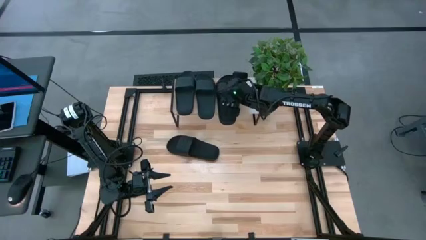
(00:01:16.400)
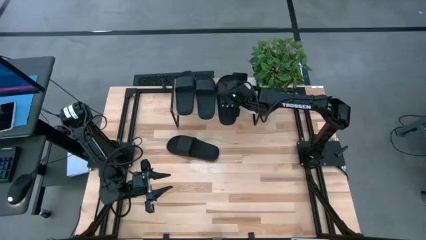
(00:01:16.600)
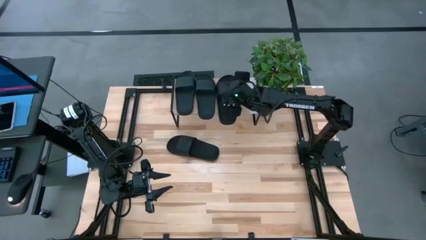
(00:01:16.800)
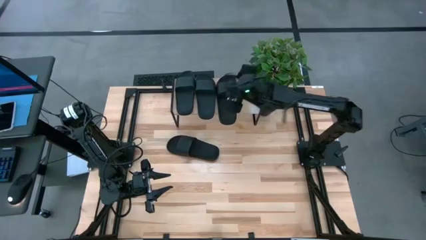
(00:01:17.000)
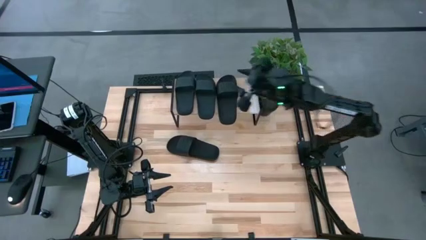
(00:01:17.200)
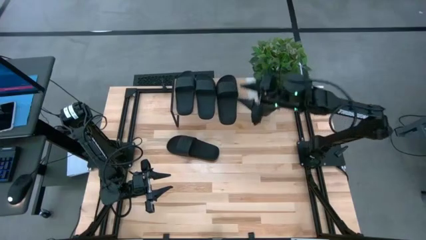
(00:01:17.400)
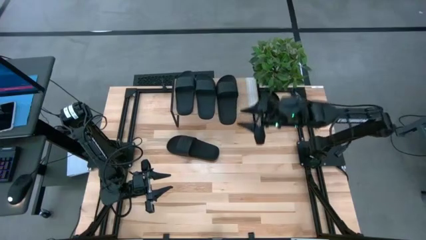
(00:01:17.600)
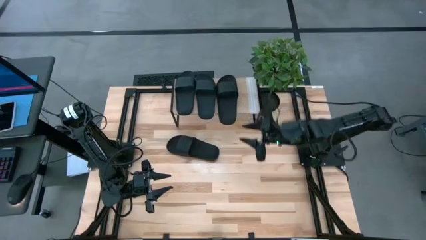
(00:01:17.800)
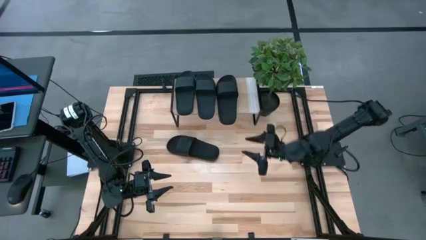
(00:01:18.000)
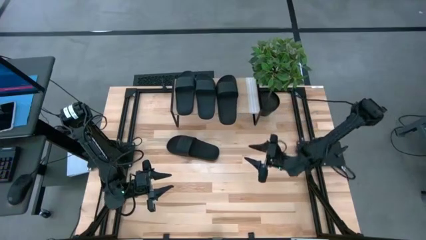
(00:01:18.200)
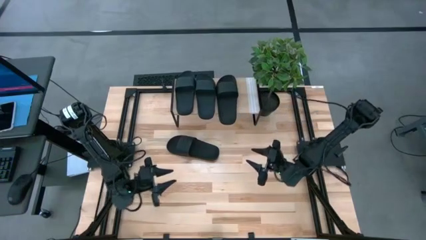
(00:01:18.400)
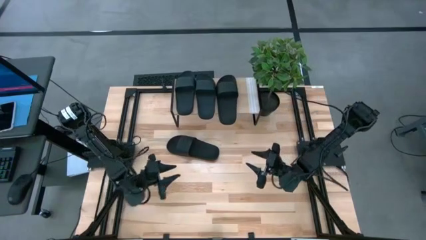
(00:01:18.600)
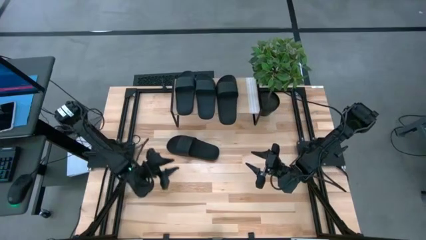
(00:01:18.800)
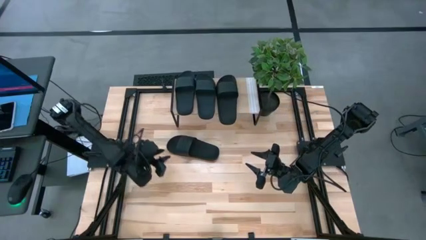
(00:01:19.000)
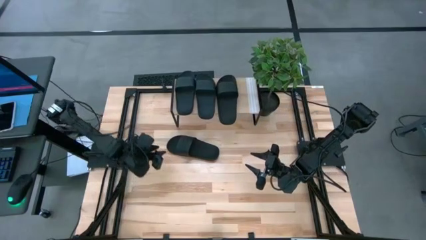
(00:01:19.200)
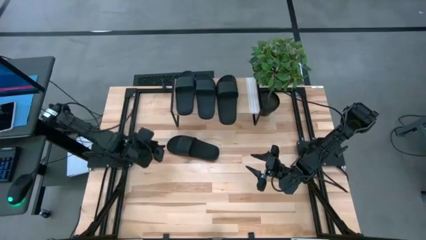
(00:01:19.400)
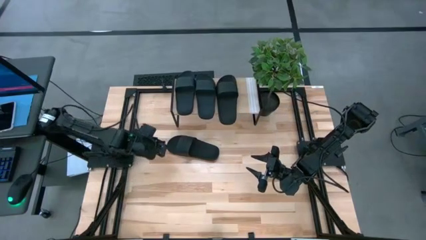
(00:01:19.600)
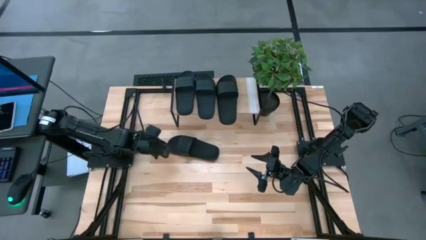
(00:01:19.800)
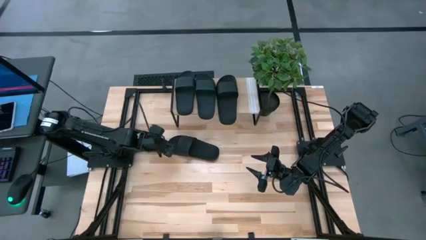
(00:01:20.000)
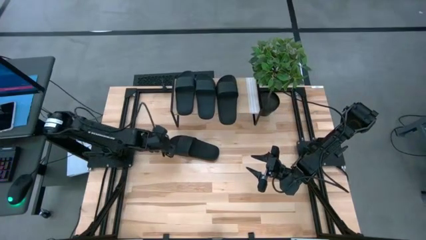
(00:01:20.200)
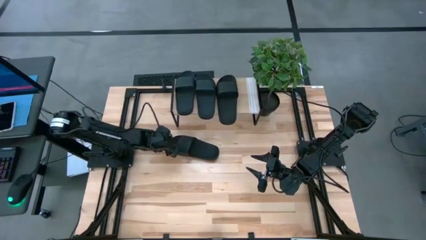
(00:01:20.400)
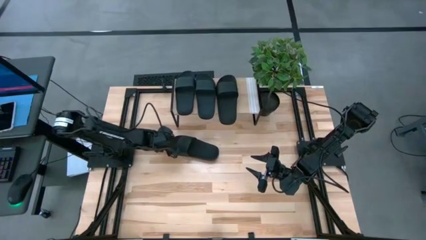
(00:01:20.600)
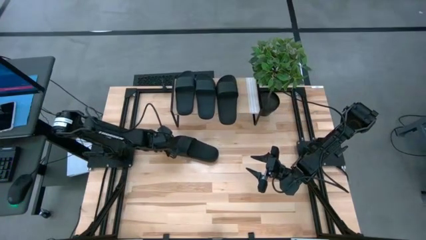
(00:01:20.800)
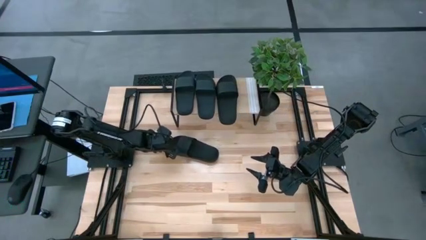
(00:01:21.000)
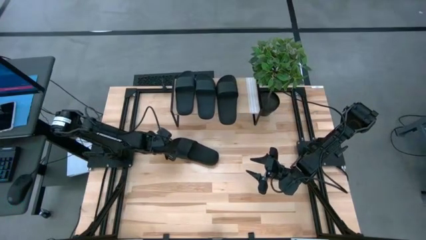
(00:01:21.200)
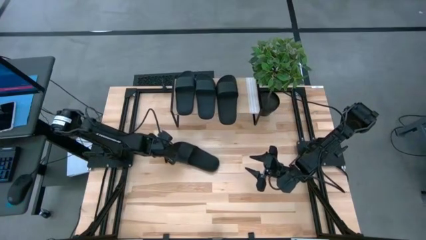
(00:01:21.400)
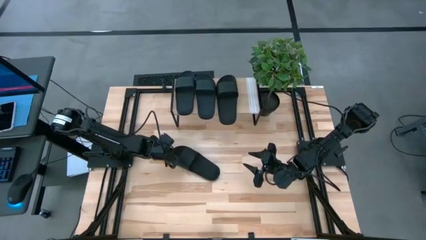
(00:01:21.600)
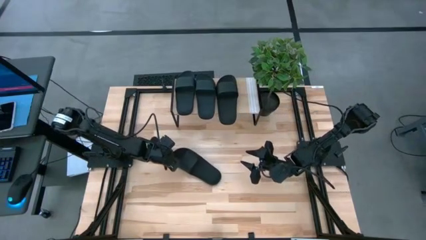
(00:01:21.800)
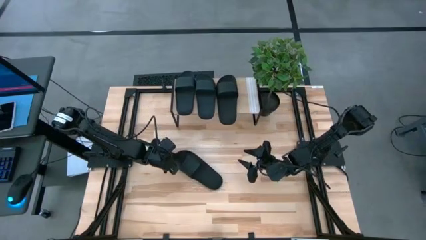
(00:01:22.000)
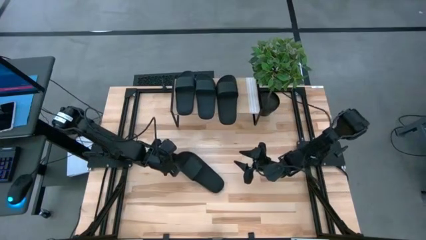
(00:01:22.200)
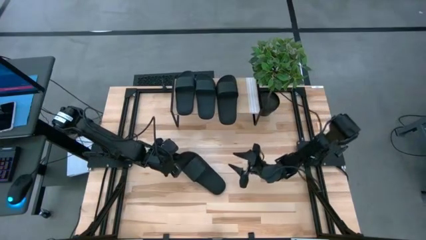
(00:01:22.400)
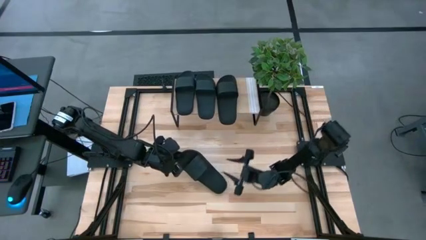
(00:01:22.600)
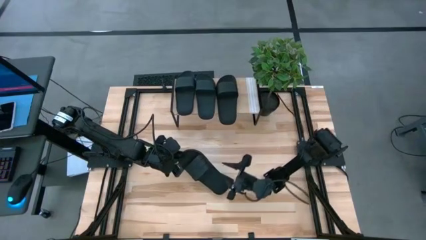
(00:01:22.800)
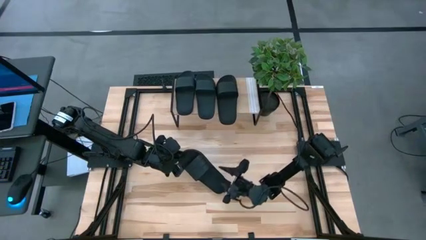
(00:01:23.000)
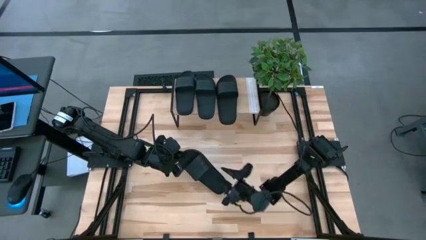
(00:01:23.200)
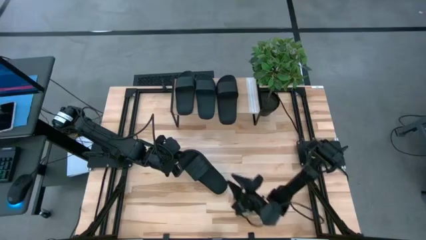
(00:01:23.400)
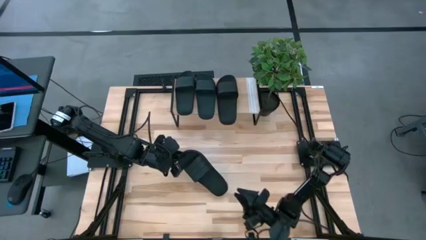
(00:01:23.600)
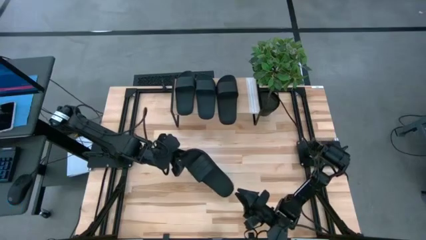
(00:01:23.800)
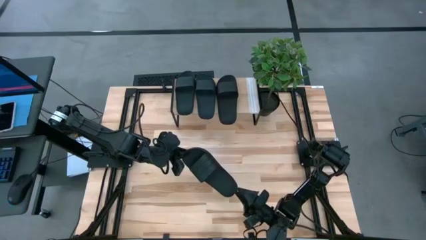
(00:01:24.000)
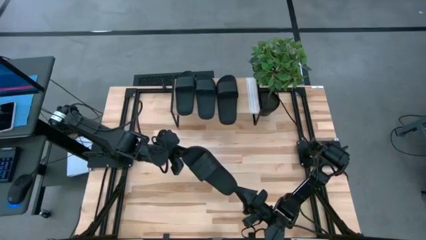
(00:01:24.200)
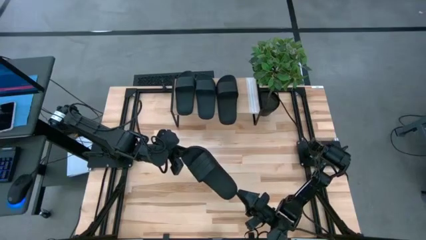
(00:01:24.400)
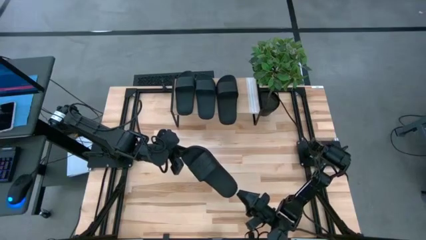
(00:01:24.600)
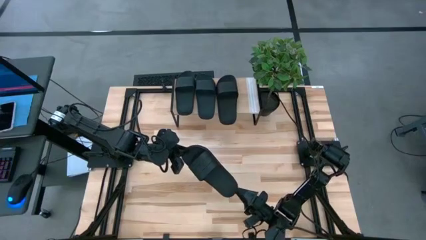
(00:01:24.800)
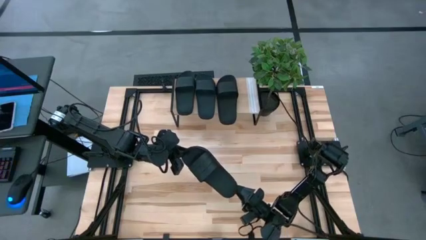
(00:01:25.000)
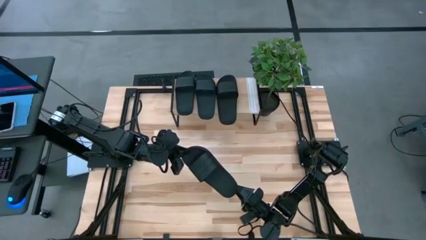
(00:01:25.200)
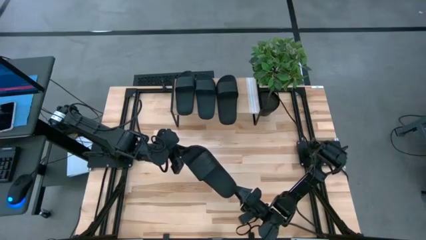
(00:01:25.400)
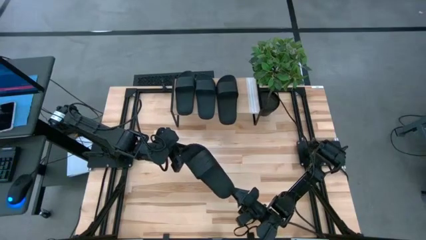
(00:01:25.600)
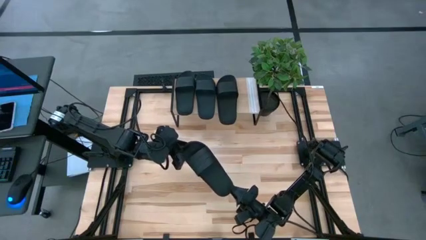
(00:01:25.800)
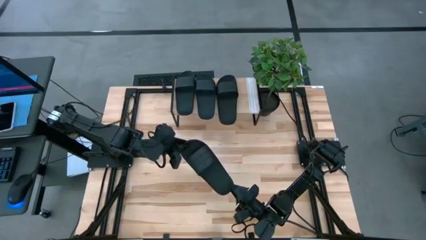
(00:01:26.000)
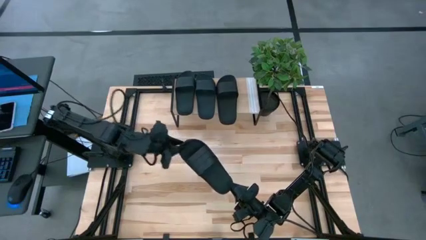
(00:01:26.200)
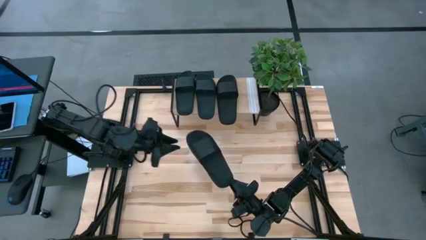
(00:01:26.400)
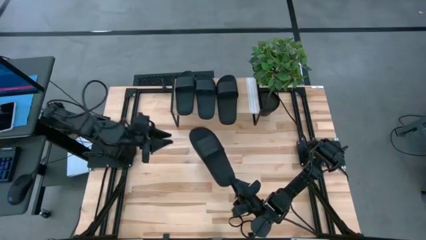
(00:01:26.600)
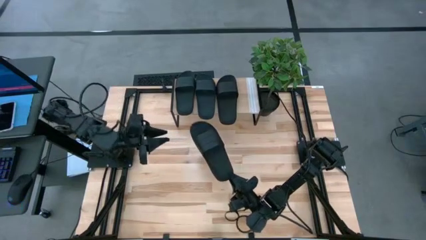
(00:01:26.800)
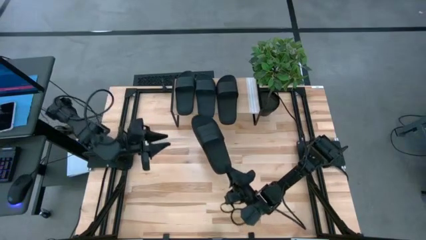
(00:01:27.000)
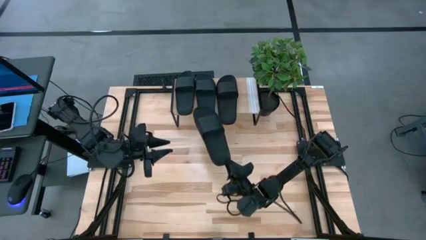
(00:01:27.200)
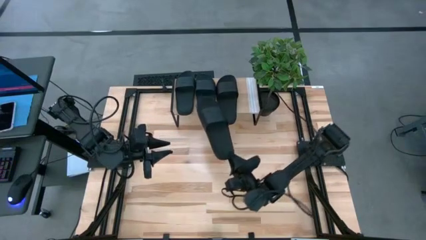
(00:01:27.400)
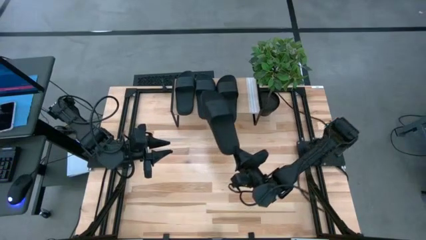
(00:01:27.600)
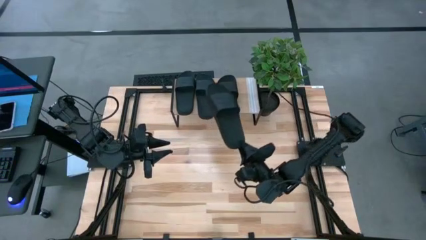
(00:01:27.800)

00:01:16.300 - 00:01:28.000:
Task: Pick and place slides into the shelf
Put the black slide on the shelf

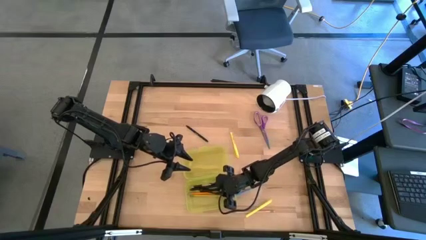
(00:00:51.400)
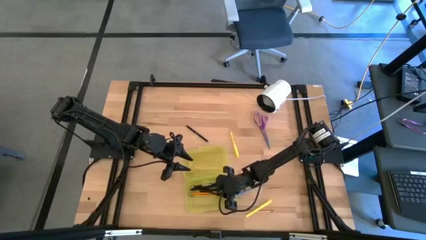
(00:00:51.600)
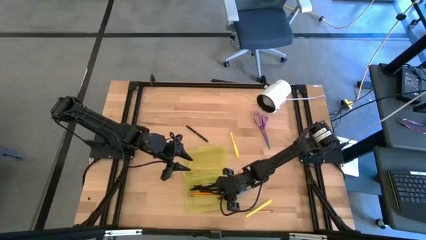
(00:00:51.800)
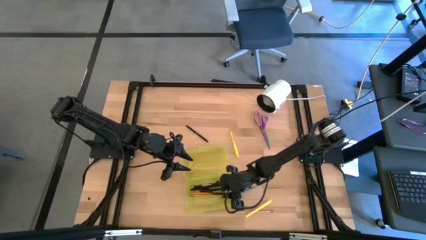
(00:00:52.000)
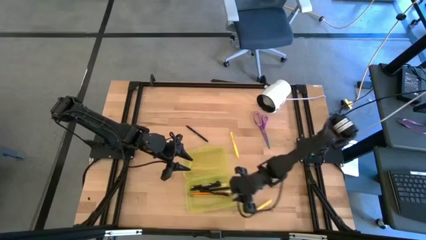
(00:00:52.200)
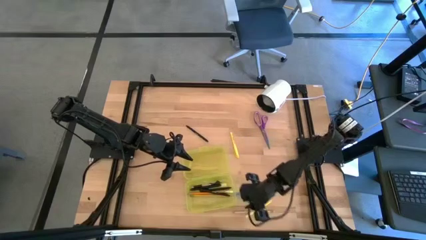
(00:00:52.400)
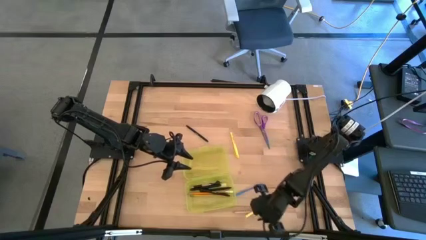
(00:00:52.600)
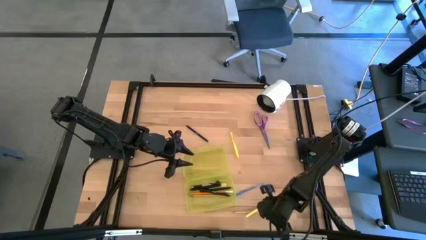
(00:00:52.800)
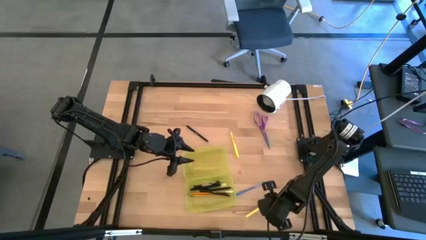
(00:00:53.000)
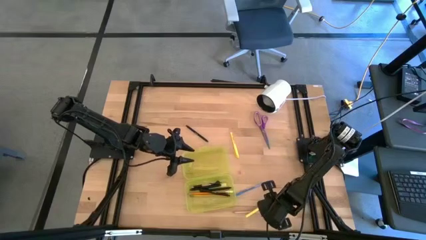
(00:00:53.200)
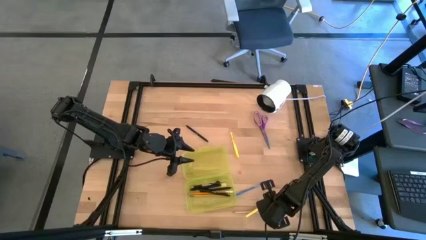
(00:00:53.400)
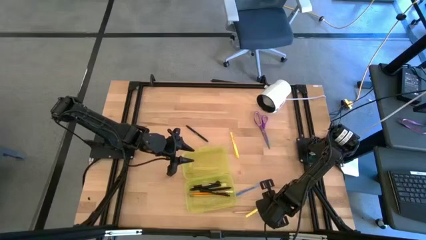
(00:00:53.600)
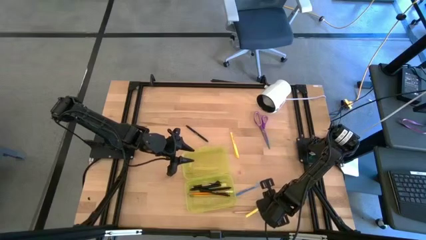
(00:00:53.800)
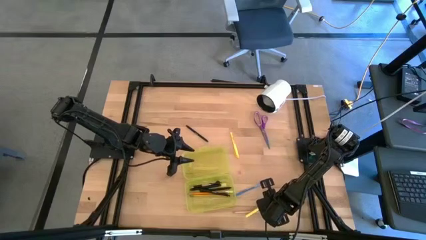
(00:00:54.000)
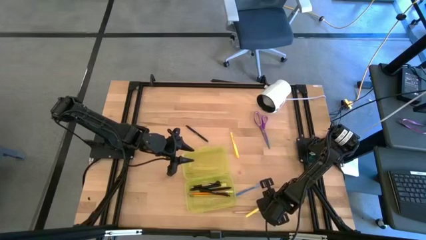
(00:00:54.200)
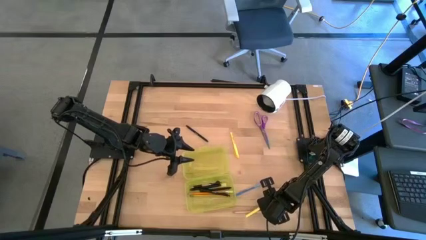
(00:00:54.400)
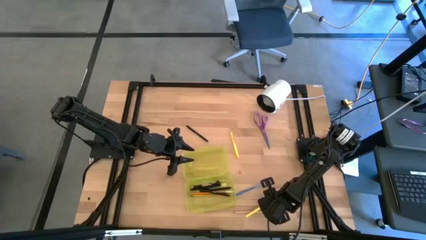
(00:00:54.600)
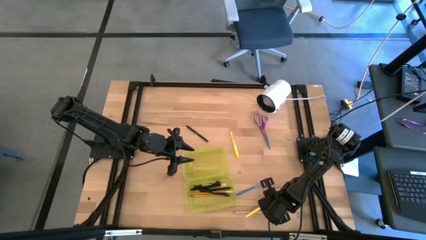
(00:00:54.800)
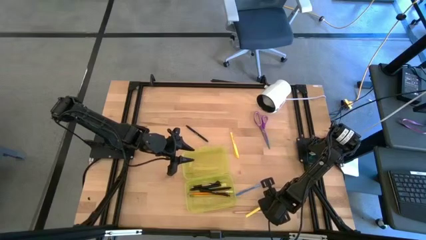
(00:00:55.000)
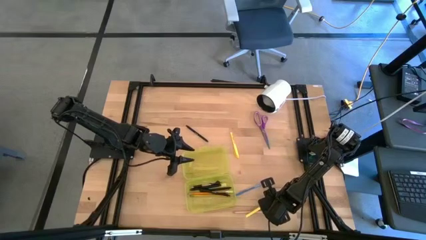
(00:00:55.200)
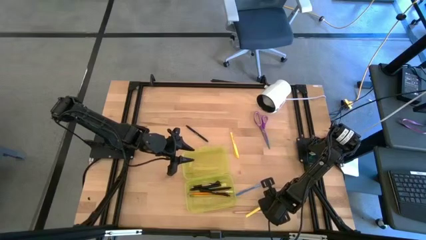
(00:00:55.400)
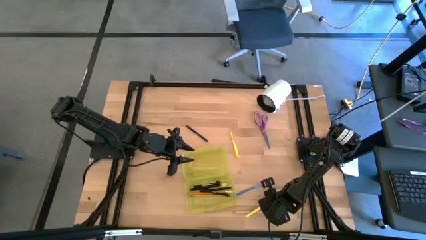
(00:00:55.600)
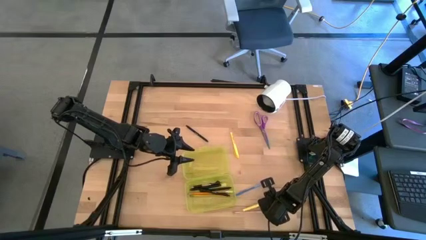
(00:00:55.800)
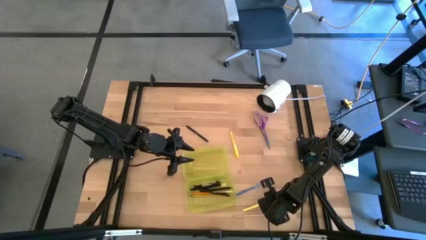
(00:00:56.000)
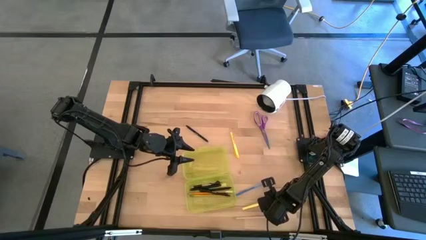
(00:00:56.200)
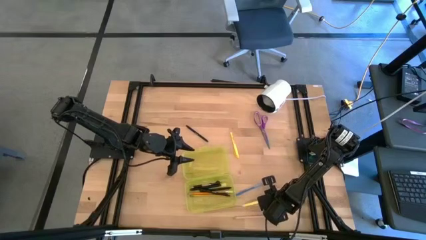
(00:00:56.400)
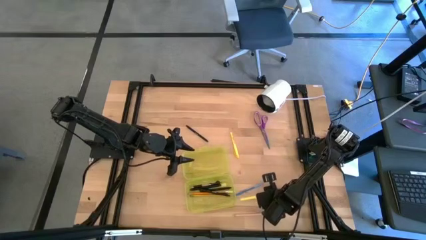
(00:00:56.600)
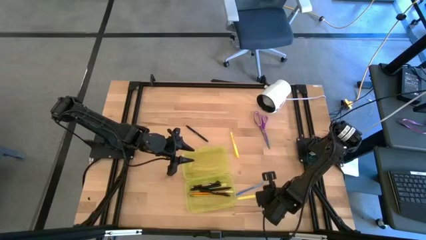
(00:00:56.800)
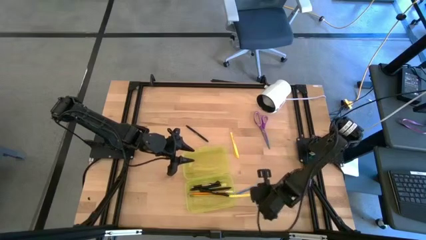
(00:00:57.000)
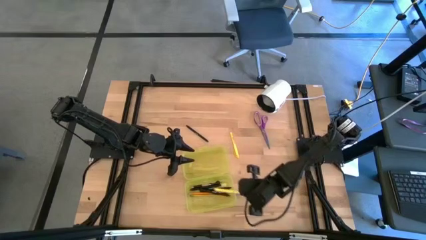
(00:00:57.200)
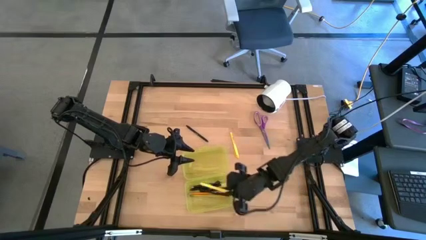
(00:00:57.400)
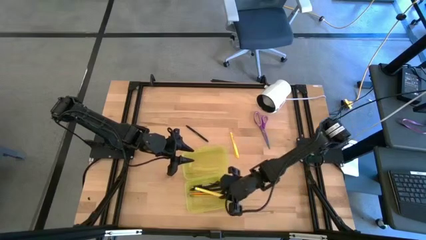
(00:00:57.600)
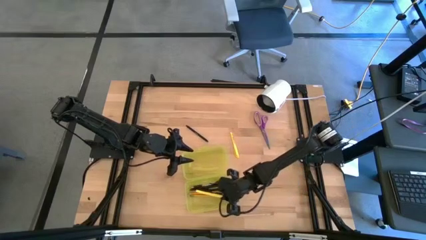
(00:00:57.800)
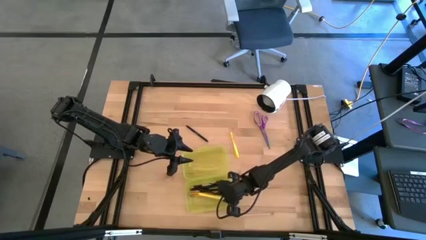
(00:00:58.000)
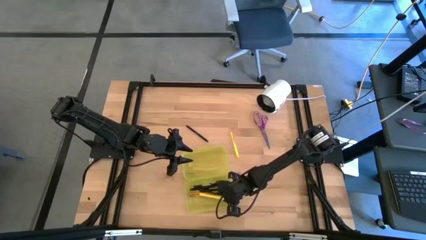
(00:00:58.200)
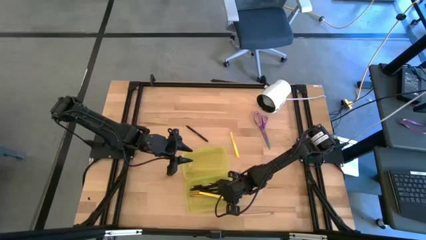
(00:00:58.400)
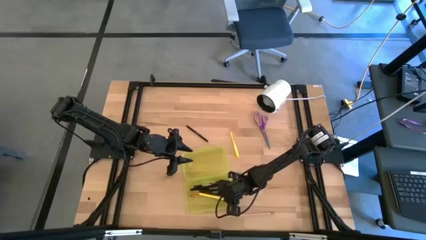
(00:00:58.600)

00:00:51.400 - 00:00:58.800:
Task: Pick & place school supplies into a supply box
Put the yellow pen into the yellow supplies box
